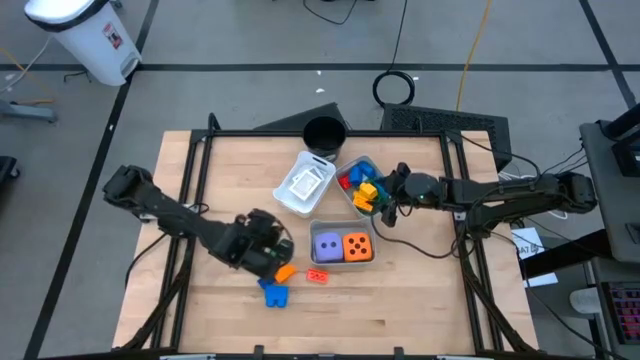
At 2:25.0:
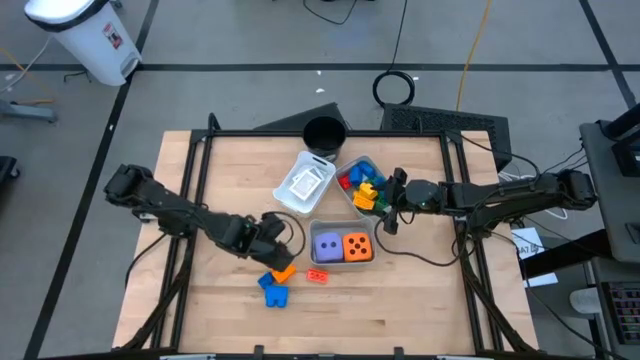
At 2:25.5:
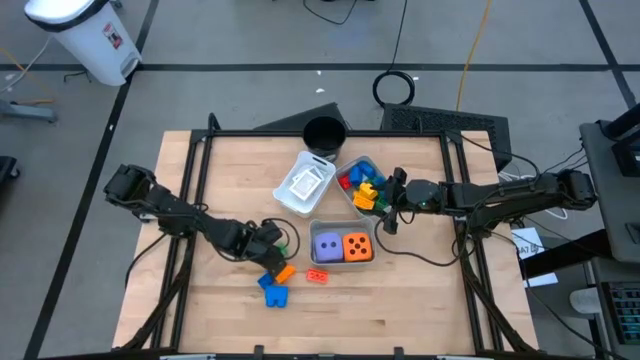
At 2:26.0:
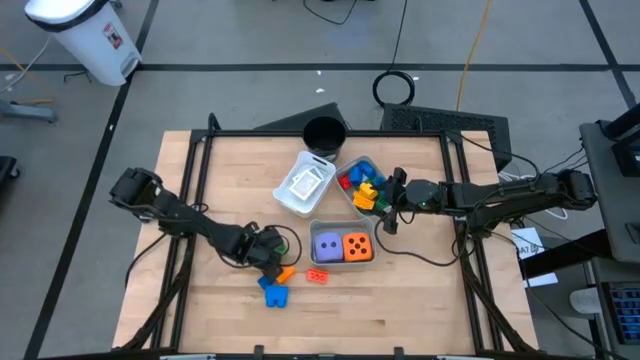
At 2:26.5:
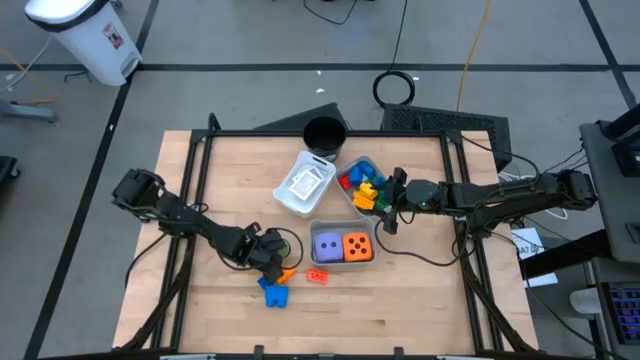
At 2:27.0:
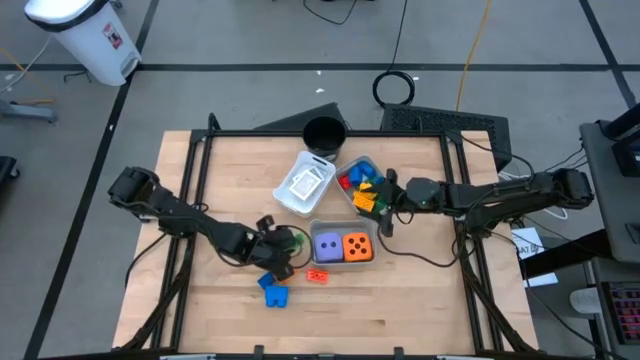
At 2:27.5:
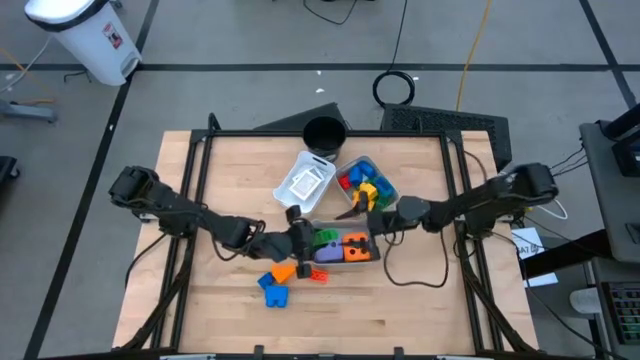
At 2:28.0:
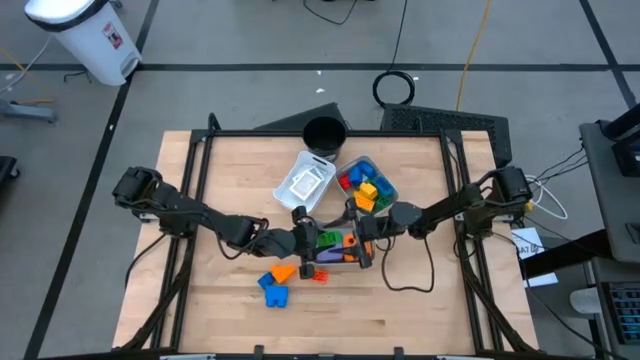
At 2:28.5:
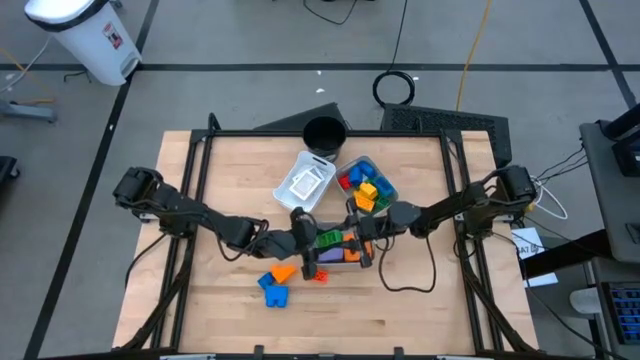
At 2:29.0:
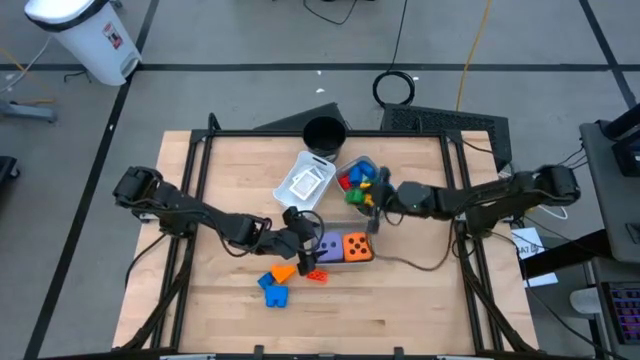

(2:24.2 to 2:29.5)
Task: Pick & Place Toys
Put the green game piece into the top gray bin

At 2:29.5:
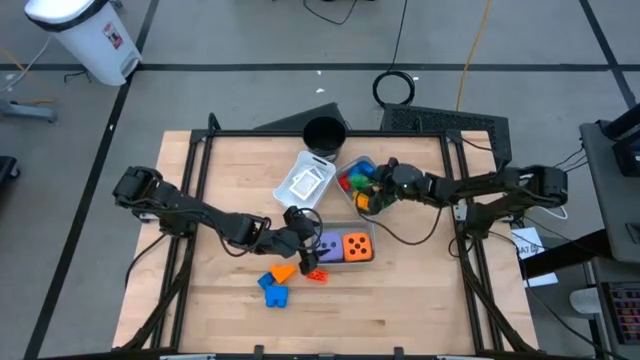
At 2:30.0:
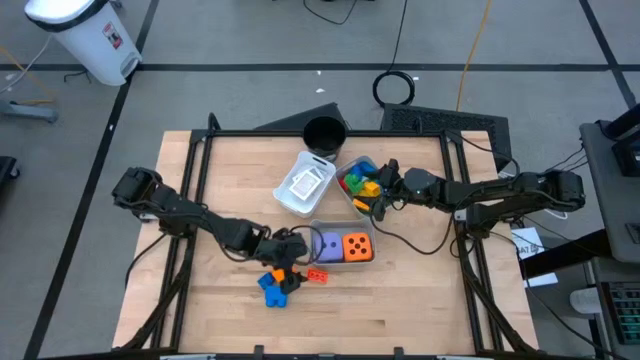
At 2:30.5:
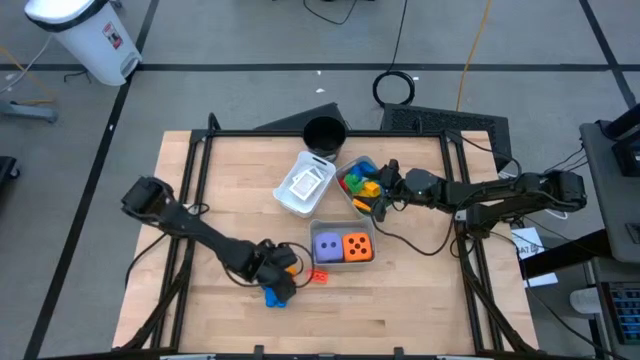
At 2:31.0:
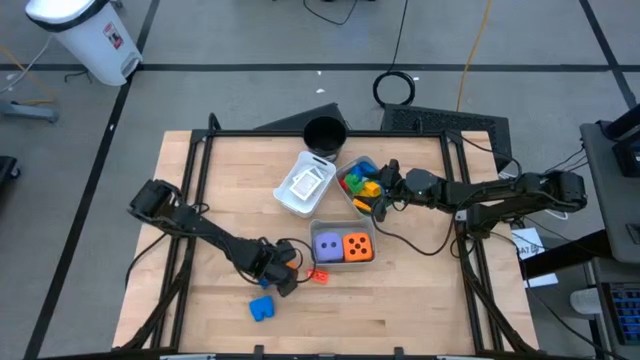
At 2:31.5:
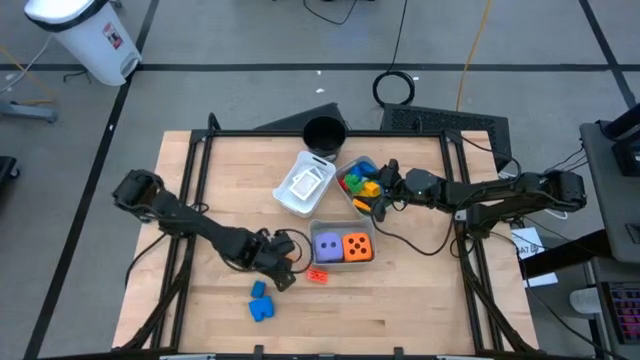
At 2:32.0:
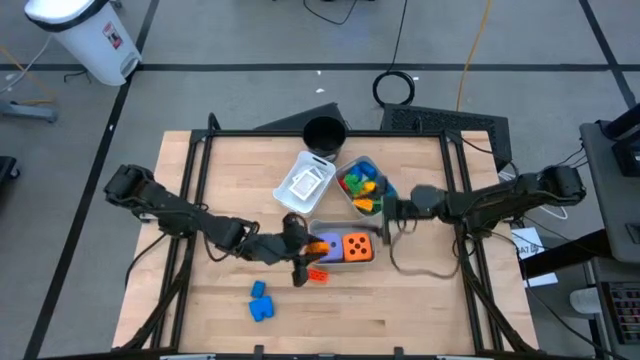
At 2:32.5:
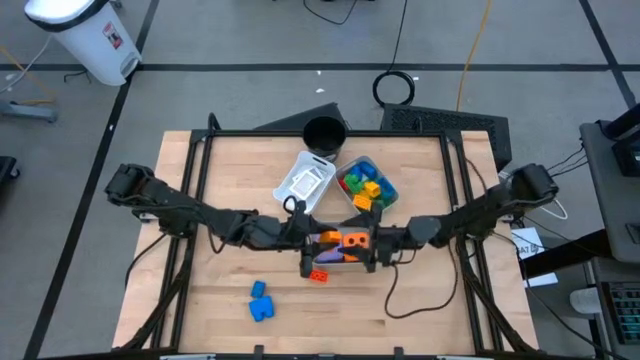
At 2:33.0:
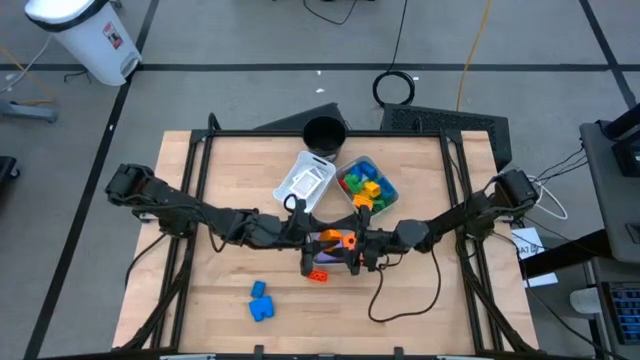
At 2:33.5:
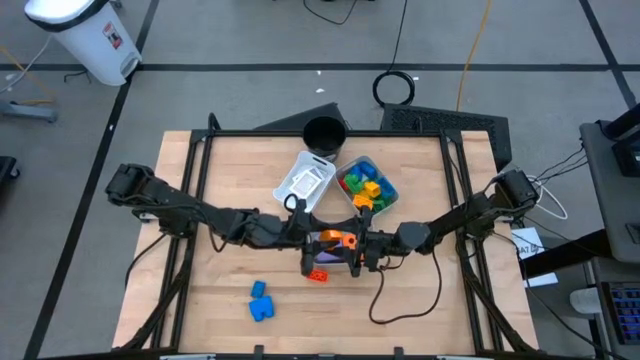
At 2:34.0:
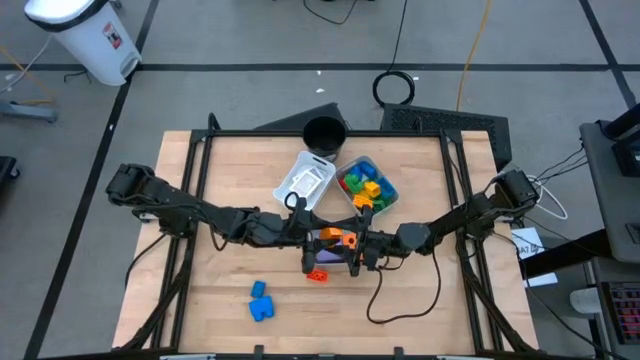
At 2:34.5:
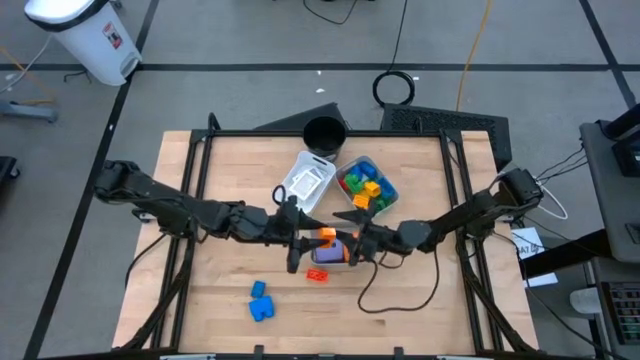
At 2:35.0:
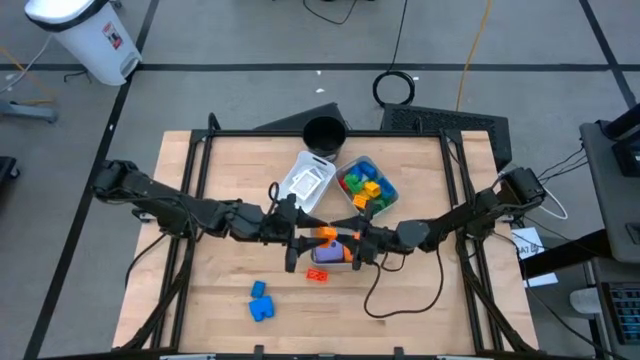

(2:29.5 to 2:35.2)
Put the orange game piece into the top gray bin

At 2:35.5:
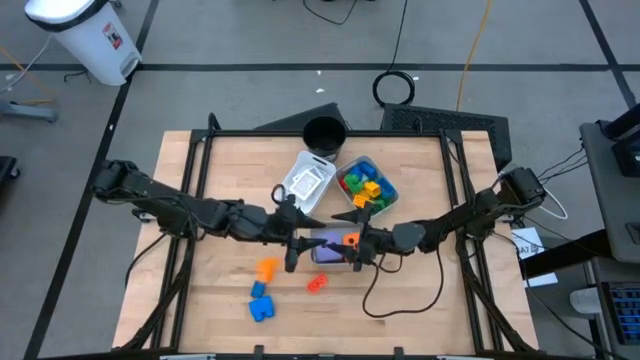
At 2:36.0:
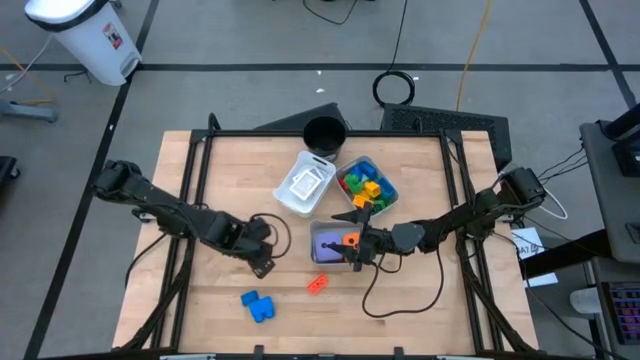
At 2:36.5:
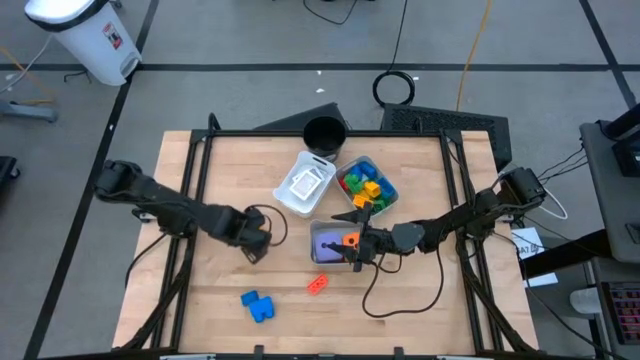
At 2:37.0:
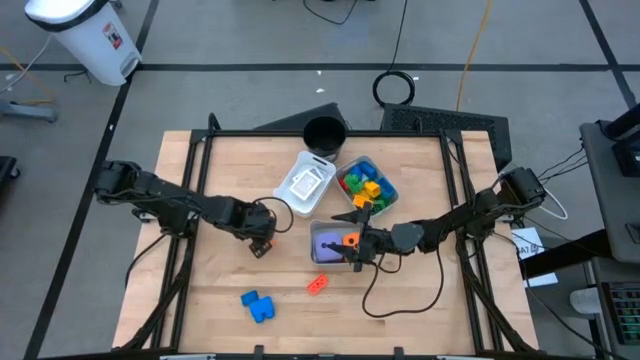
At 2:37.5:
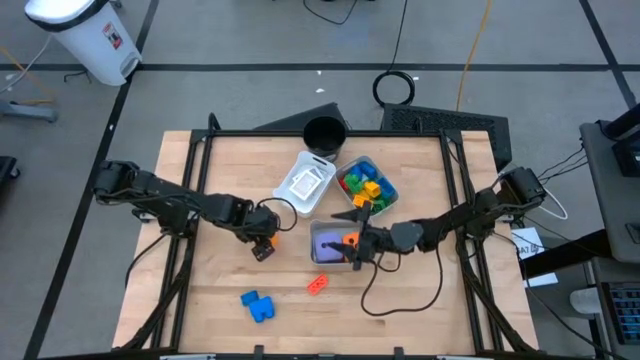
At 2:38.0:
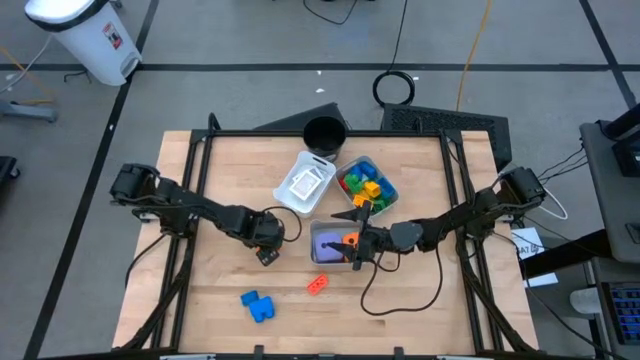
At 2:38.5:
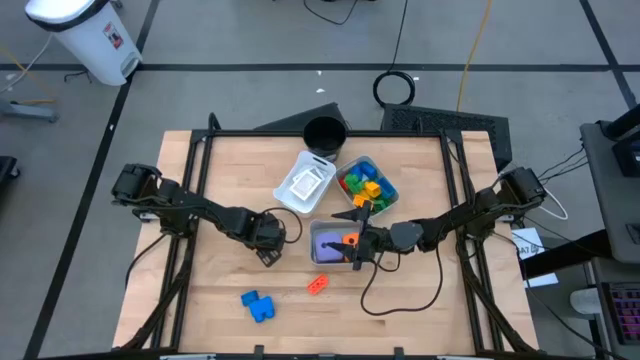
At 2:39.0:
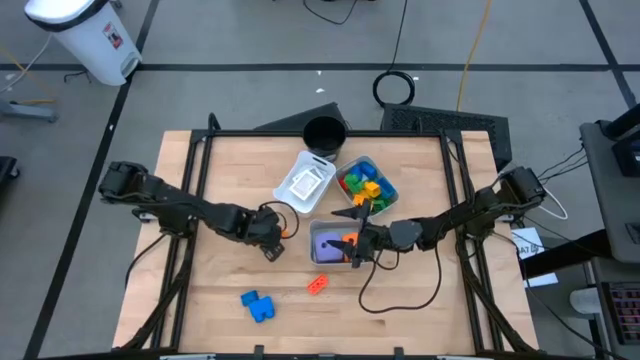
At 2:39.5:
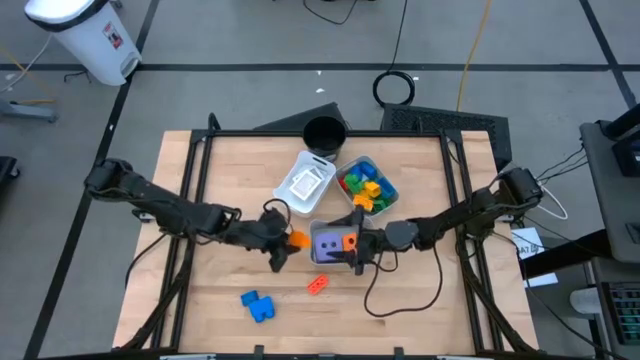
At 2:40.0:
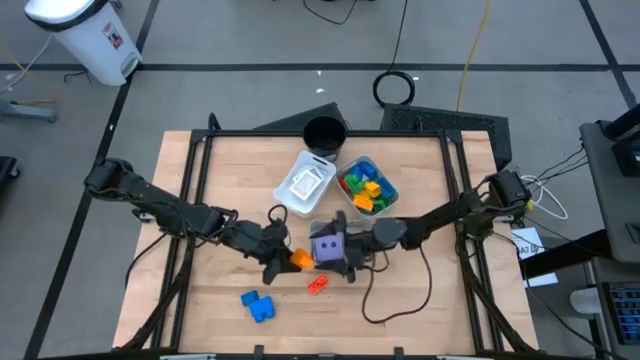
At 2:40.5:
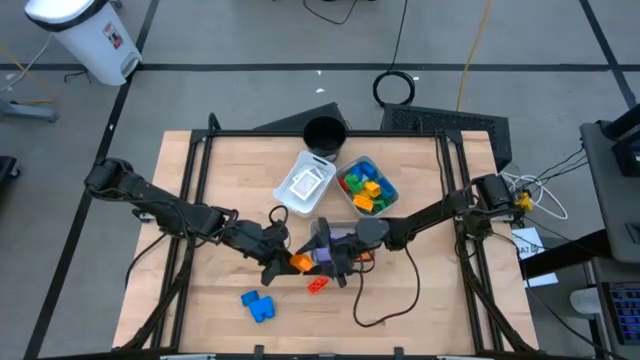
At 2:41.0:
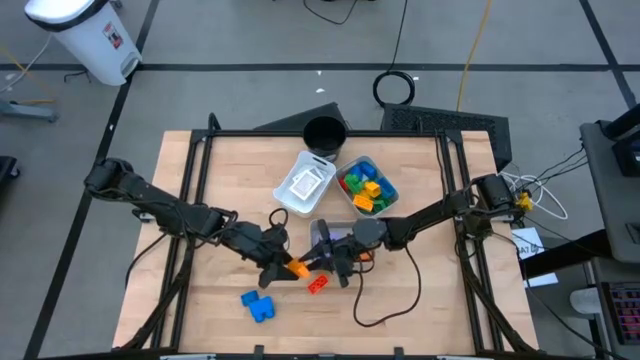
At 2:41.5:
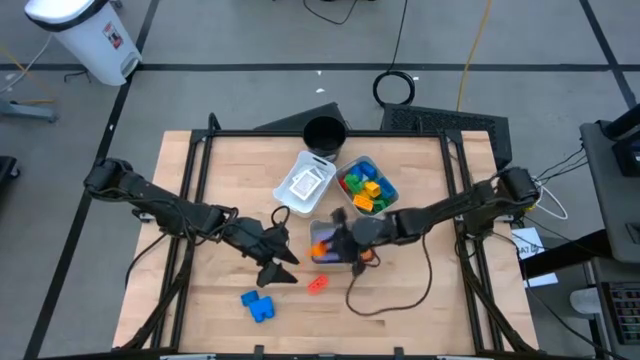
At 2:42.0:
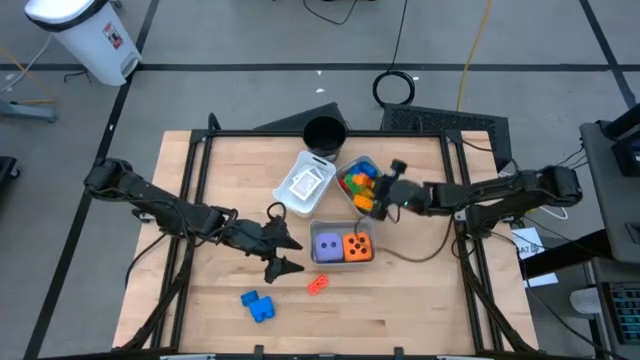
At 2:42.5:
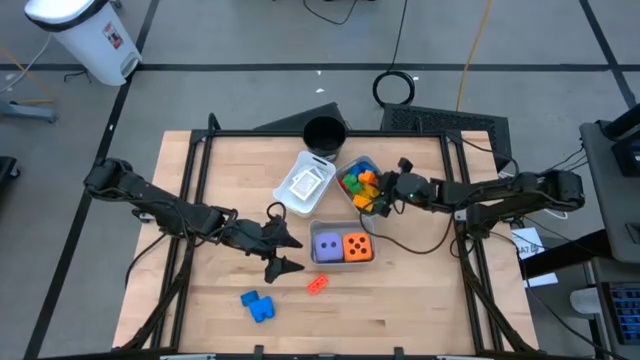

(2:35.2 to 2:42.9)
Put the orange game piece into the top gray bin
